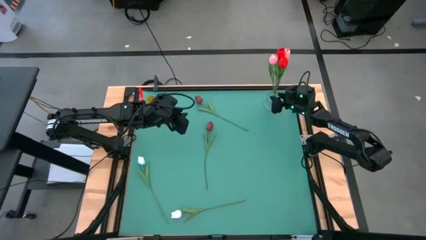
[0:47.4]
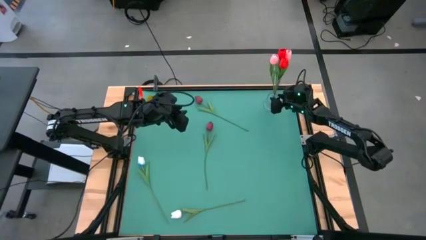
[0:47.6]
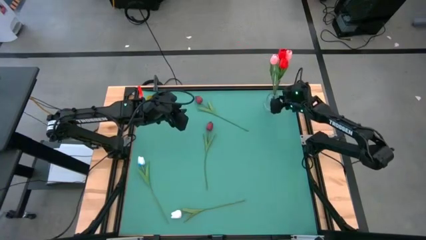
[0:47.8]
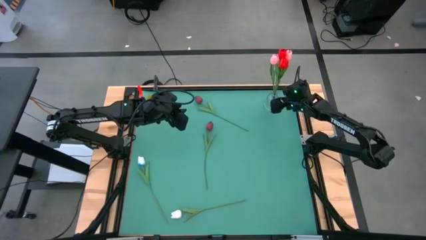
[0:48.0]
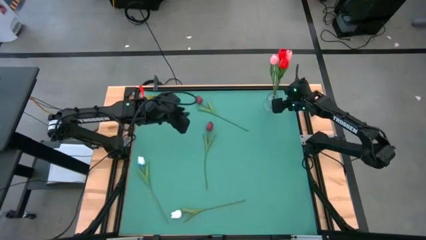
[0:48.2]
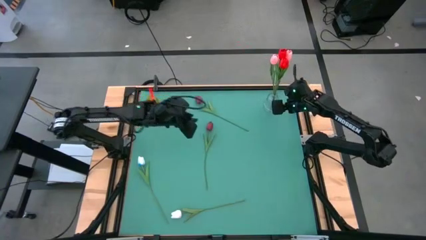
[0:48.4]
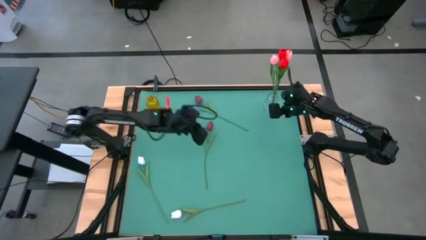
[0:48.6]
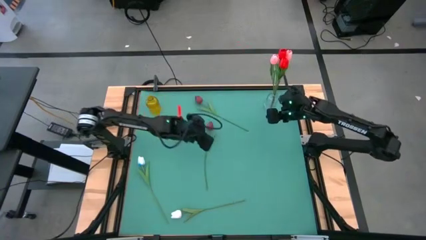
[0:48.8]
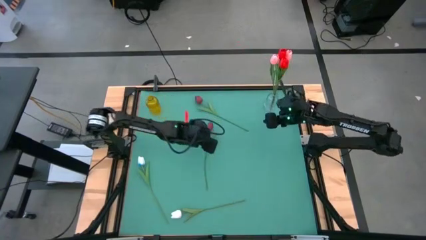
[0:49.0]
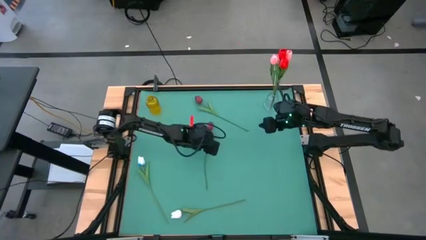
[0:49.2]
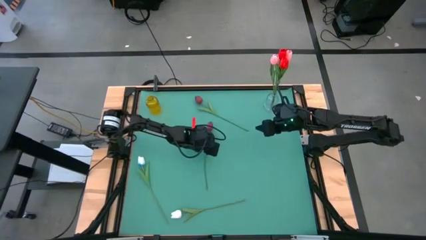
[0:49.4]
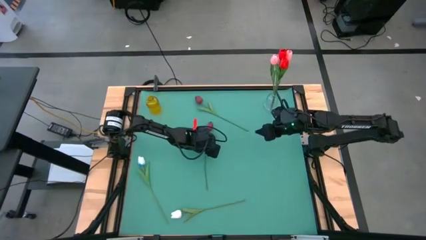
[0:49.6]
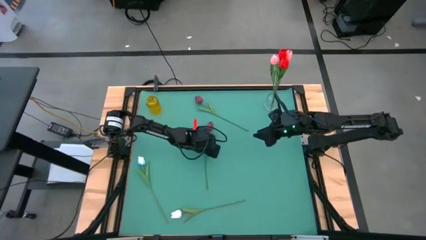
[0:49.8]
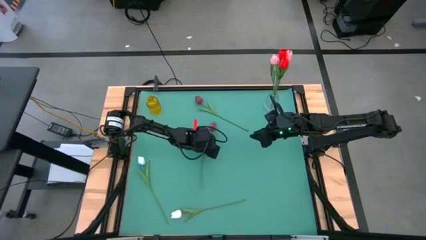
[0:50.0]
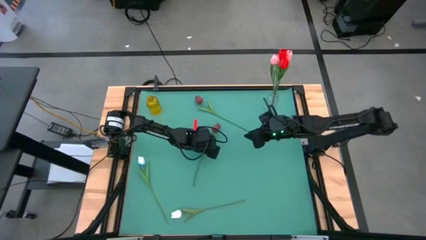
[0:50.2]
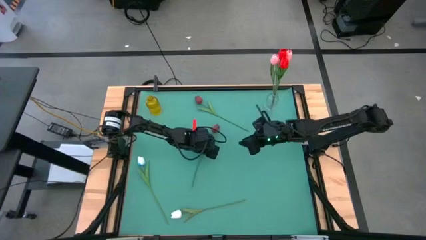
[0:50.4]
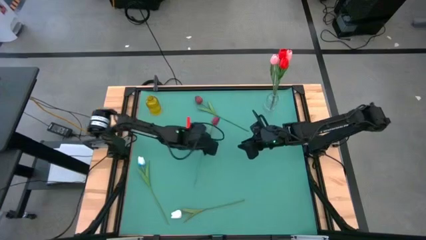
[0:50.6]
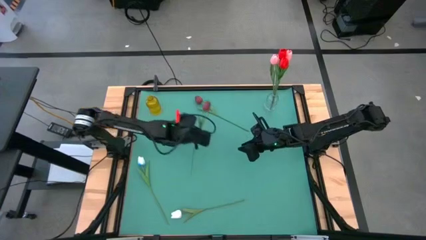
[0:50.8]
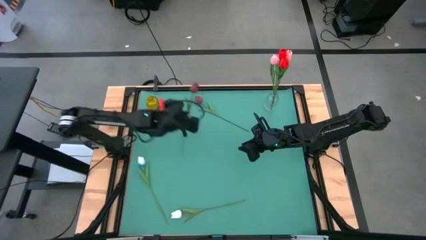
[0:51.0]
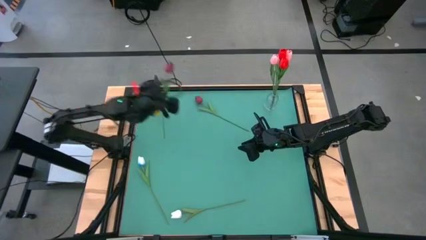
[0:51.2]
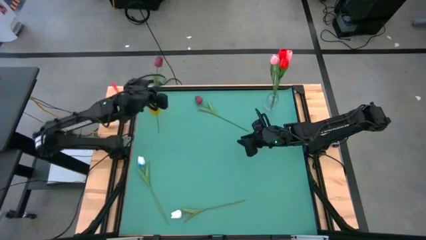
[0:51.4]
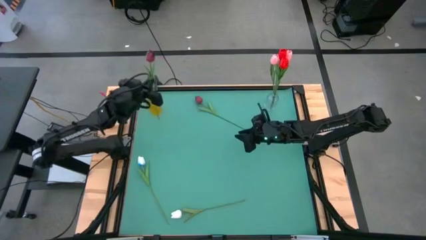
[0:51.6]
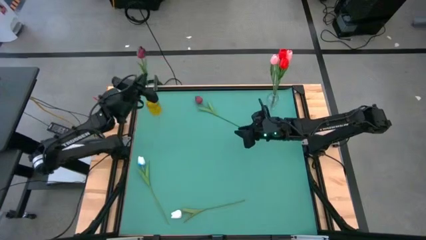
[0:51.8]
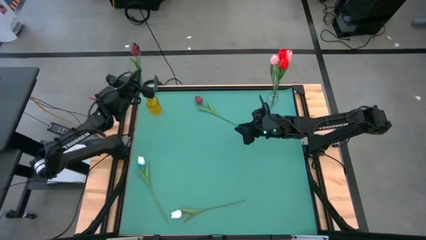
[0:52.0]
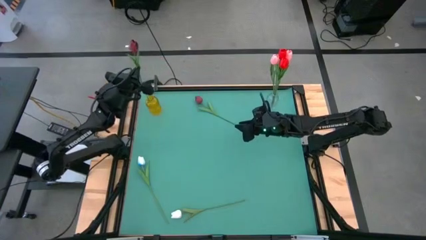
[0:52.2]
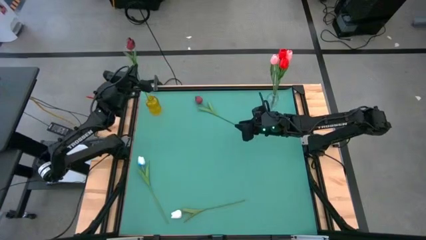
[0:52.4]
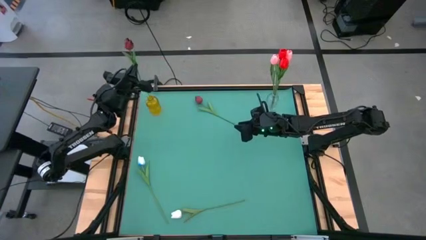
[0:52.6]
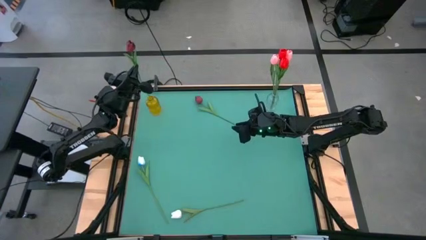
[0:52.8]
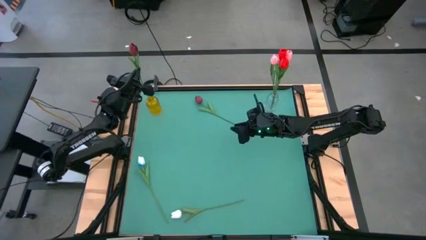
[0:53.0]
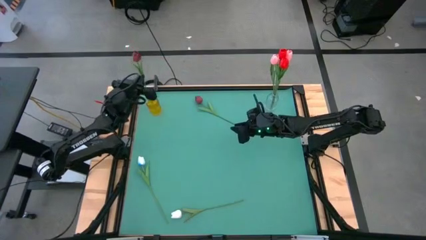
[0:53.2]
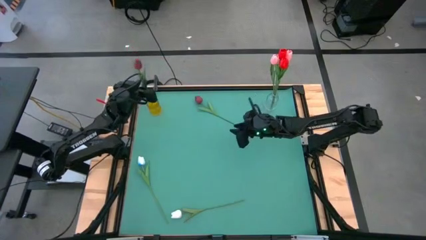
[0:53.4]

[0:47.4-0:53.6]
Task: Sort flowers into vase by color
Put the left dark red flower into the yellow vase

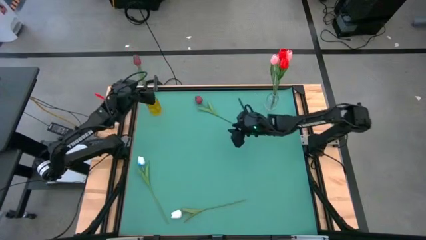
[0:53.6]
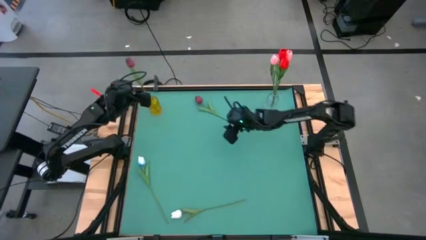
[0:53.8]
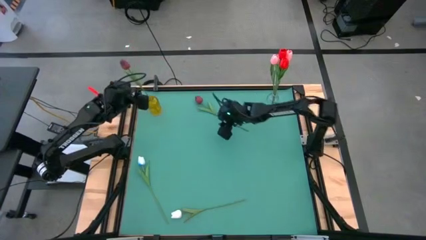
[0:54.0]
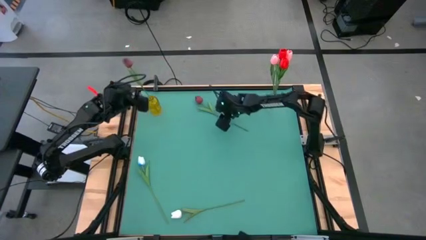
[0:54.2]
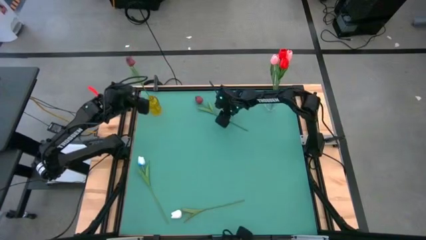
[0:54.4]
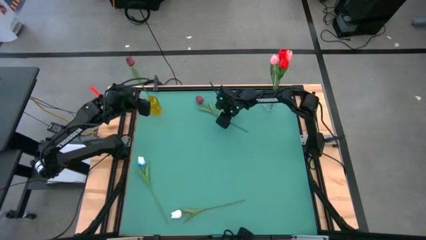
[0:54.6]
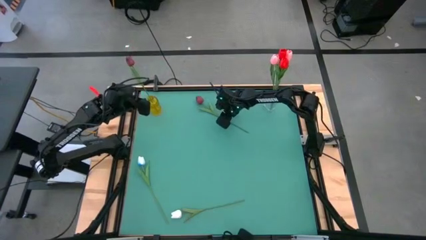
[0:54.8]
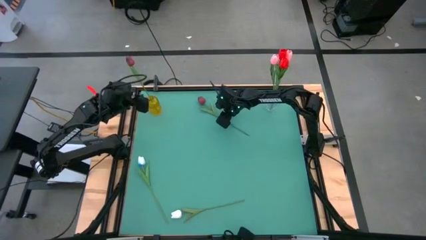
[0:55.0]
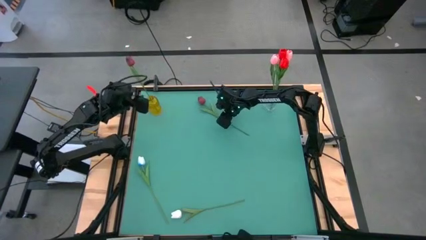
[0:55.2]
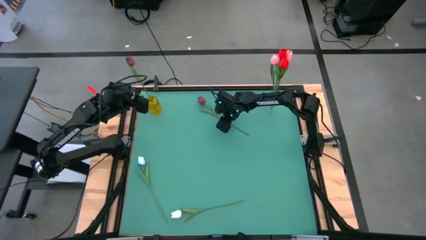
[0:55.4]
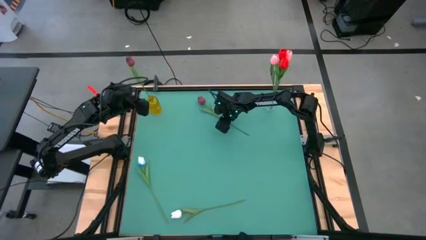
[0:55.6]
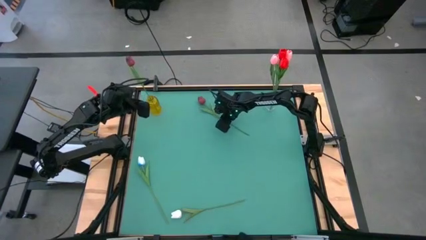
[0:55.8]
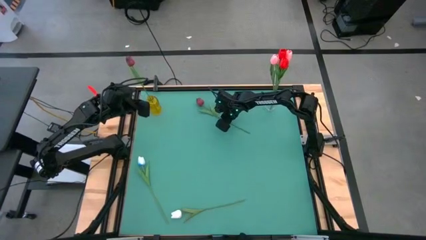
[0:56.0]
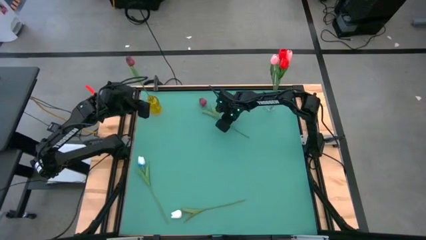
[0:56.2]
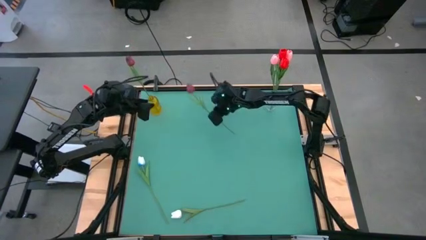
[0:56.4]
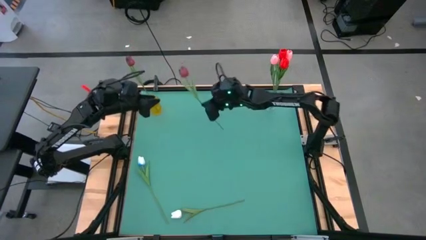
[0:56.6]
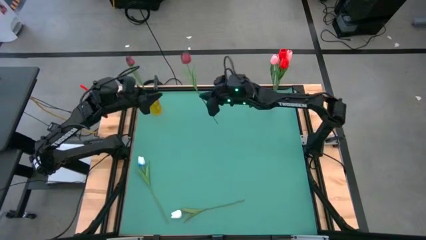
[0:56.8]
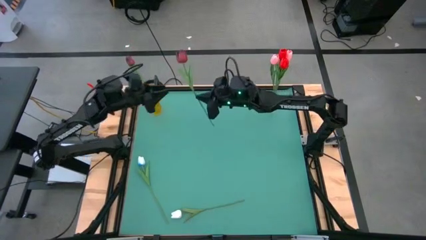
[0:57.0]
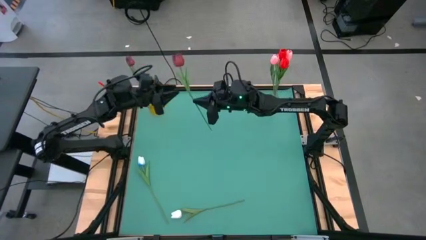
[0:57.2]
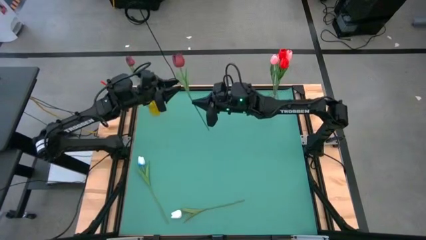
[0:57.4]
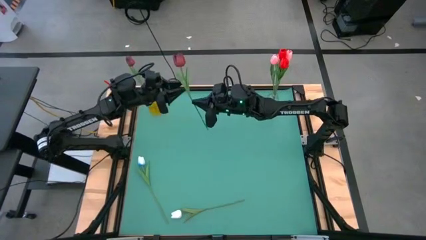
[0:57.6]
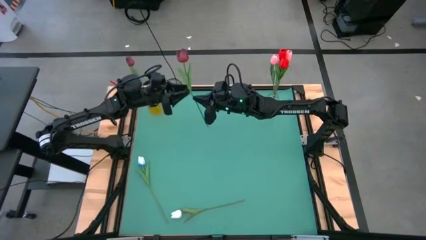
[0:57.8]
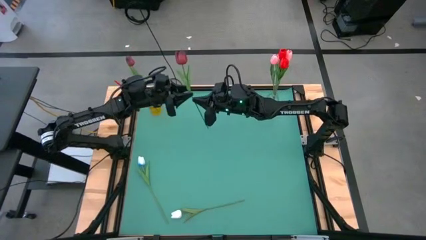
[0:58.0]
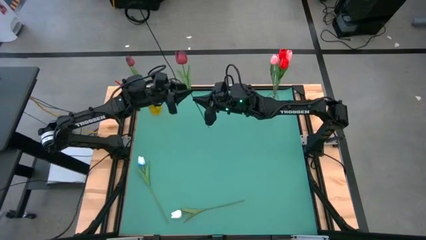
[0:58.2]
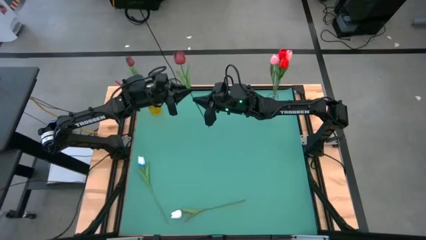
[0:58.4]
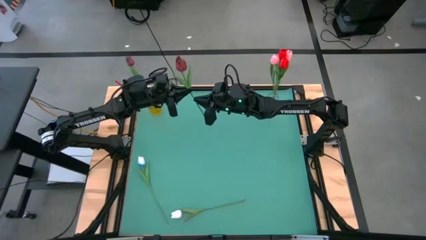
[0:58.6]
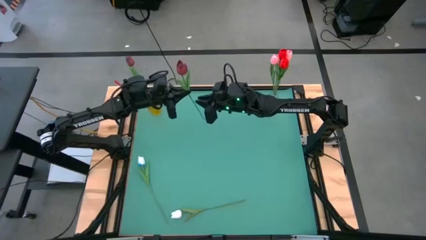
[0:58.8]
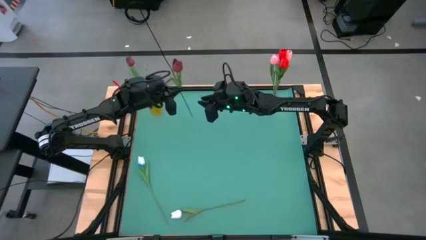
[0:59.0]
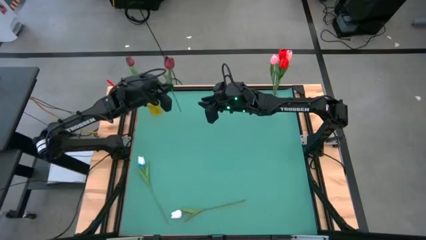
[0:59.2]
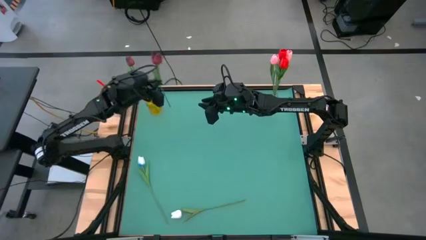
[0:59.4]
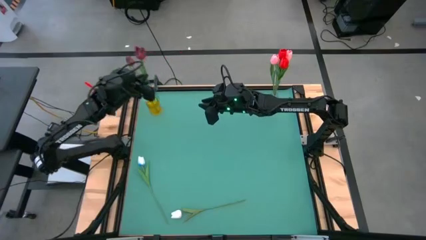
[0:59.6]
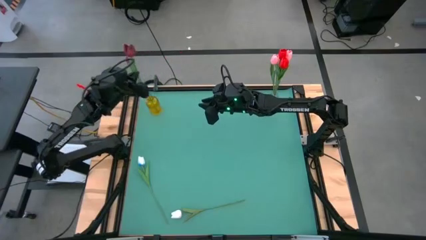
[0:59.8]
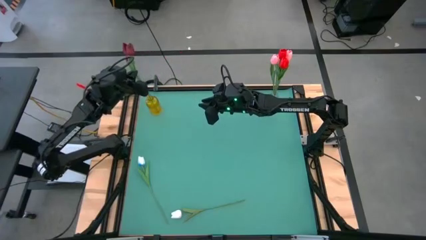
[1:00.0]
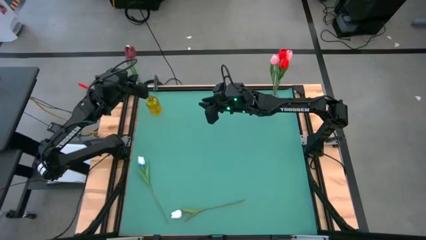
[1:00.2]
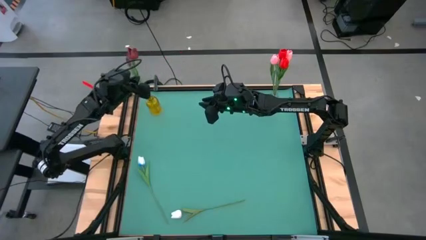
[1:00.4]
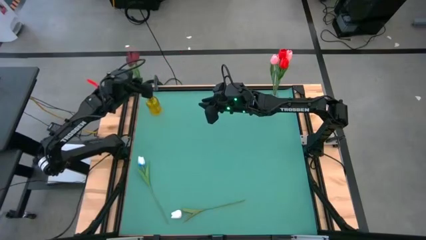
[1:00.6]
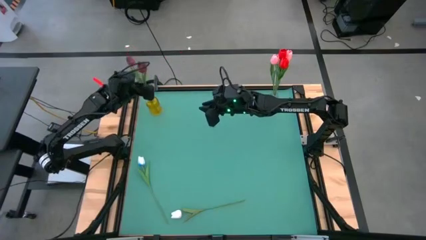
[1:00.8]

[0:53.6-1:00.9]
Put the dark red flower into the yellow vase
